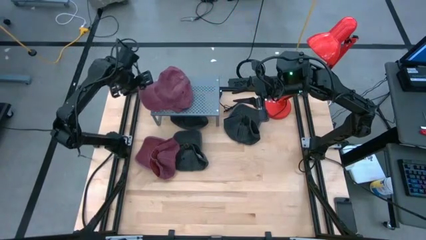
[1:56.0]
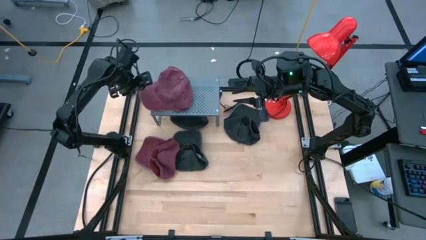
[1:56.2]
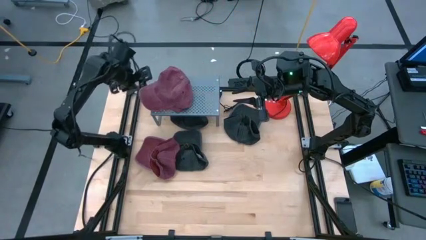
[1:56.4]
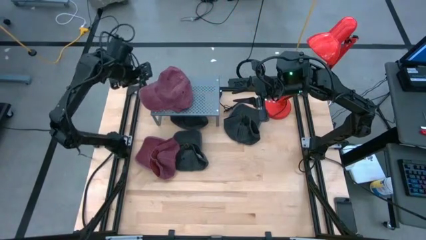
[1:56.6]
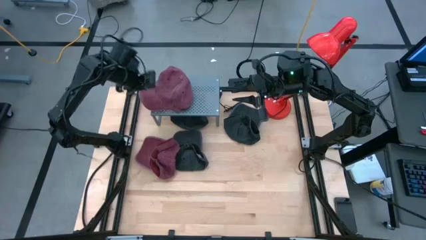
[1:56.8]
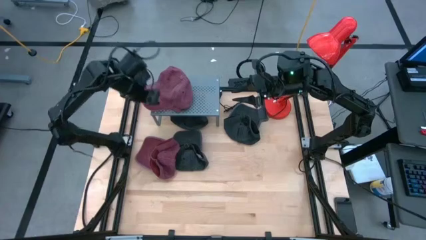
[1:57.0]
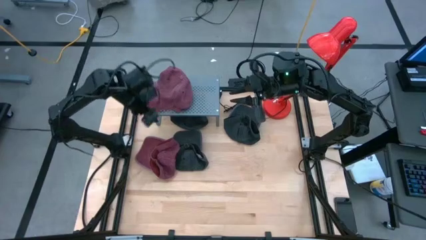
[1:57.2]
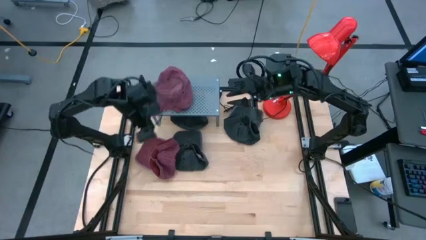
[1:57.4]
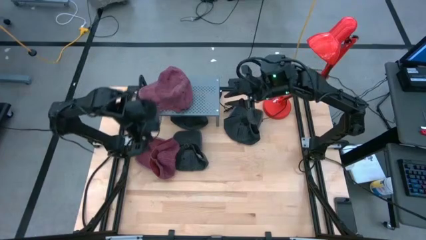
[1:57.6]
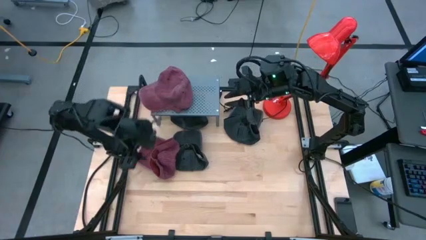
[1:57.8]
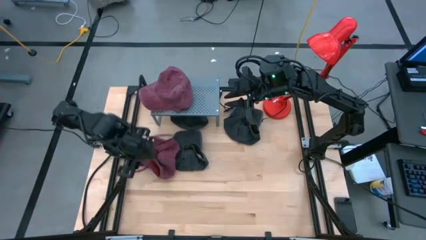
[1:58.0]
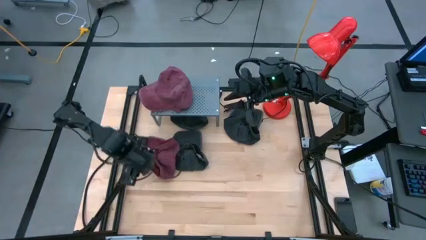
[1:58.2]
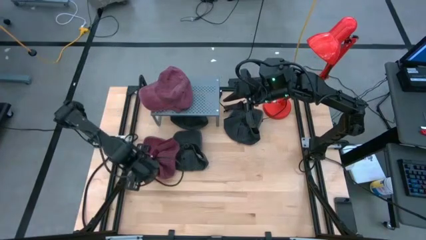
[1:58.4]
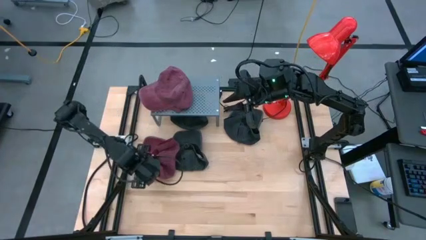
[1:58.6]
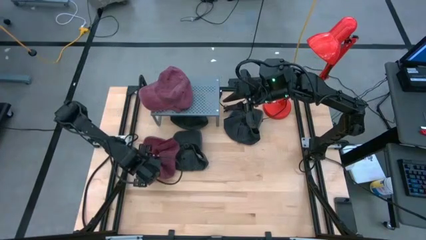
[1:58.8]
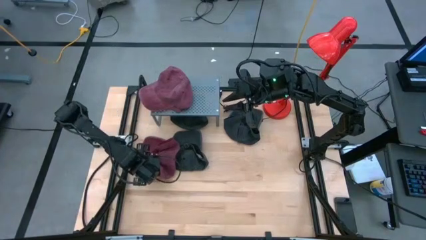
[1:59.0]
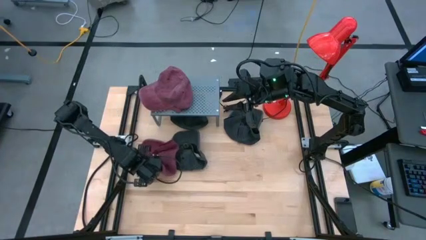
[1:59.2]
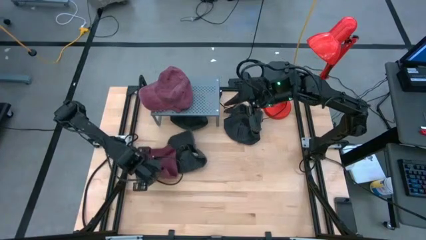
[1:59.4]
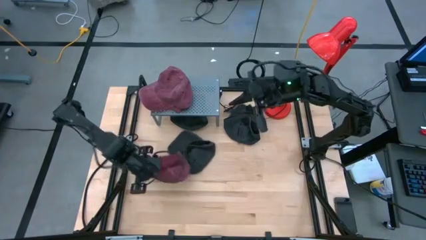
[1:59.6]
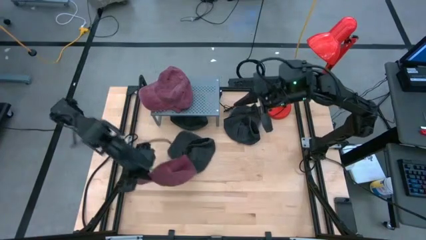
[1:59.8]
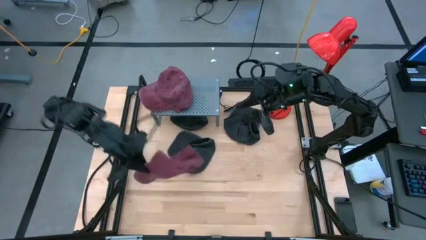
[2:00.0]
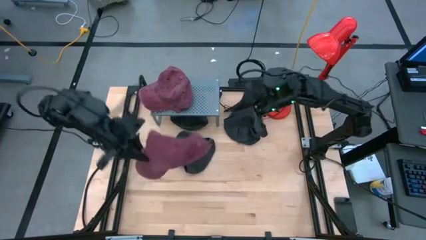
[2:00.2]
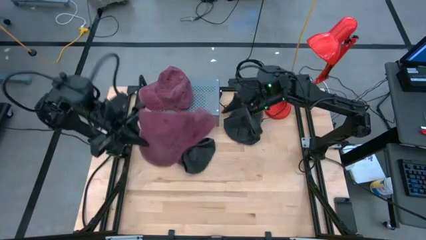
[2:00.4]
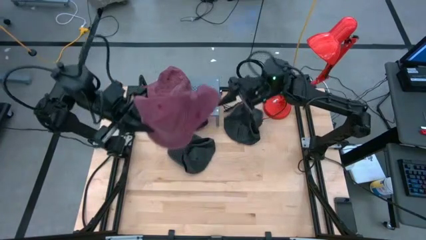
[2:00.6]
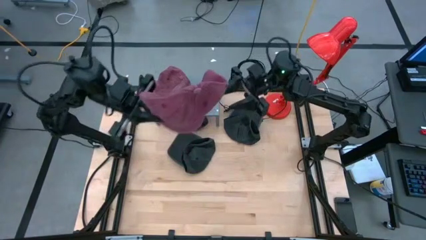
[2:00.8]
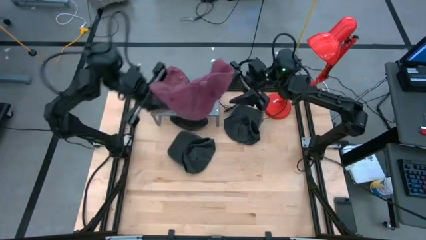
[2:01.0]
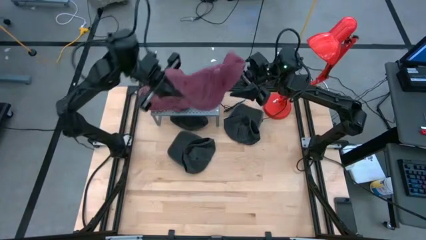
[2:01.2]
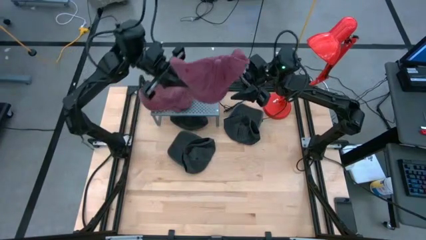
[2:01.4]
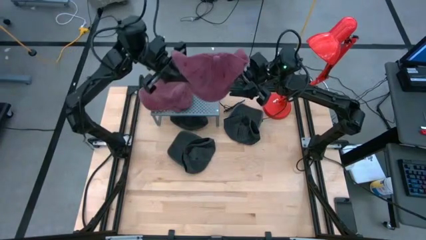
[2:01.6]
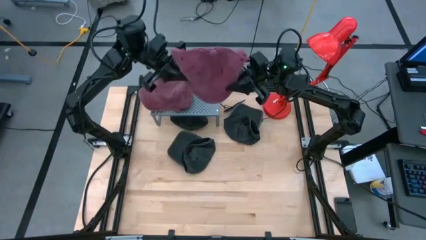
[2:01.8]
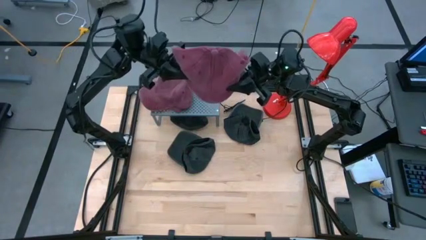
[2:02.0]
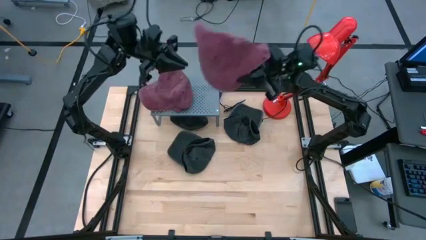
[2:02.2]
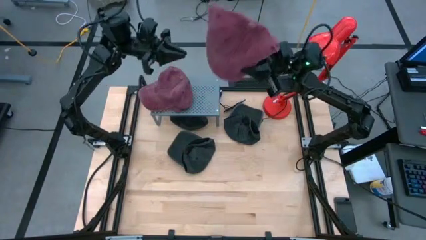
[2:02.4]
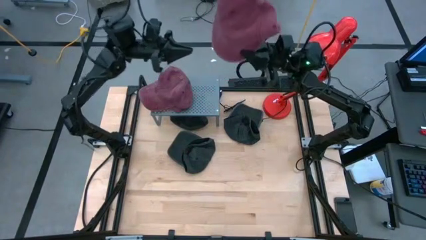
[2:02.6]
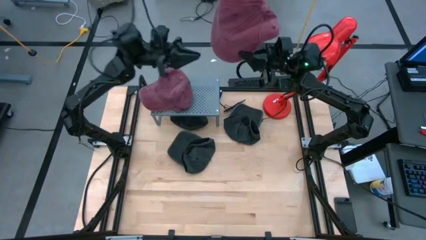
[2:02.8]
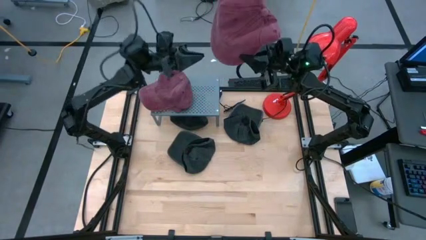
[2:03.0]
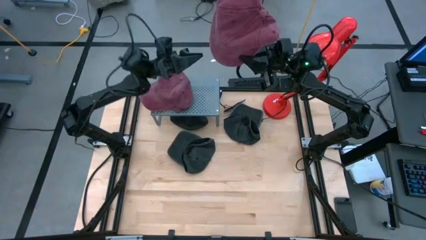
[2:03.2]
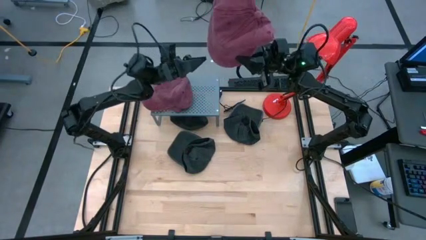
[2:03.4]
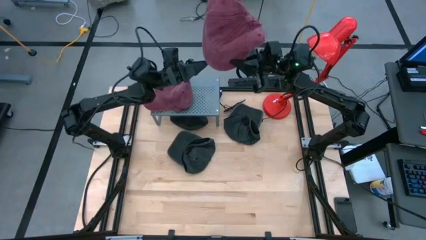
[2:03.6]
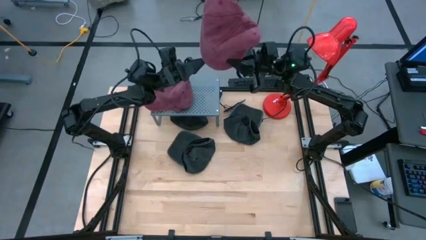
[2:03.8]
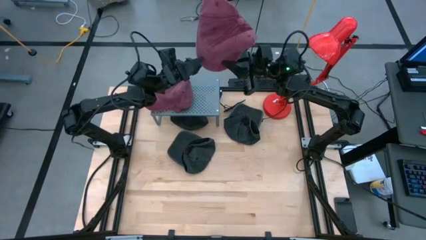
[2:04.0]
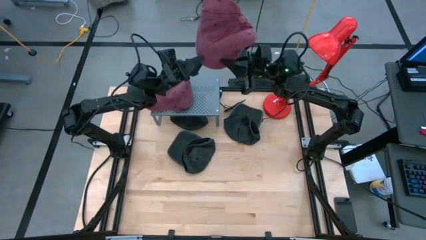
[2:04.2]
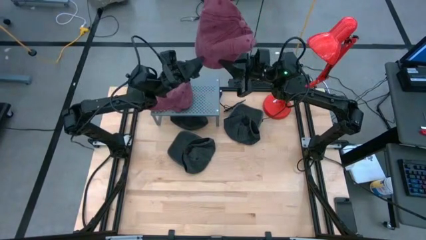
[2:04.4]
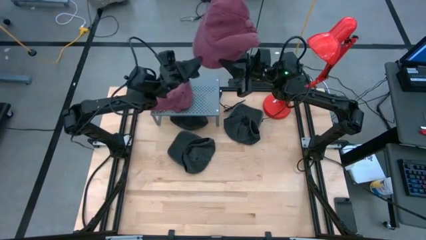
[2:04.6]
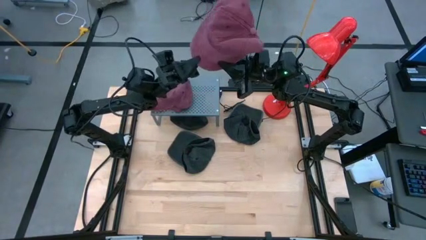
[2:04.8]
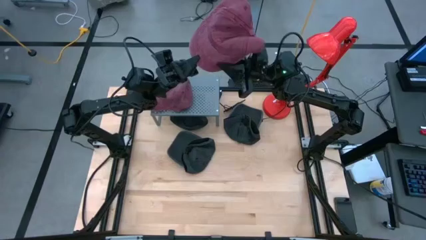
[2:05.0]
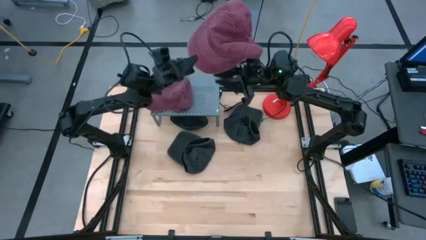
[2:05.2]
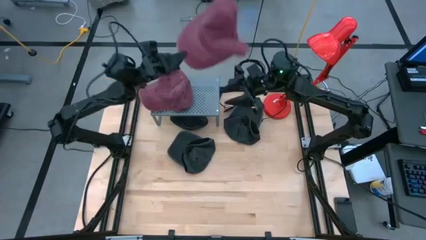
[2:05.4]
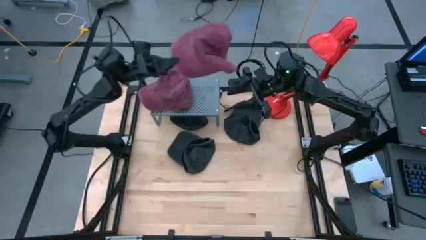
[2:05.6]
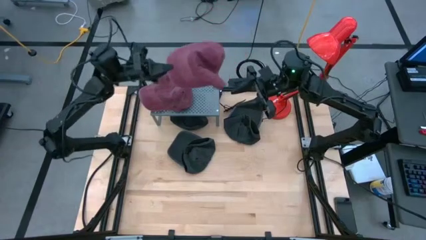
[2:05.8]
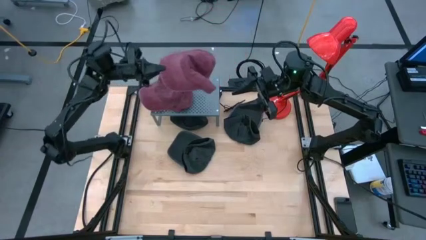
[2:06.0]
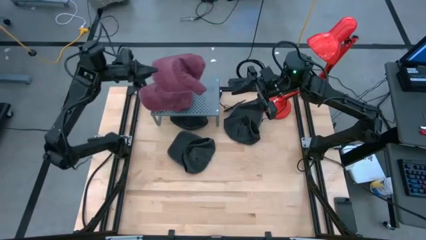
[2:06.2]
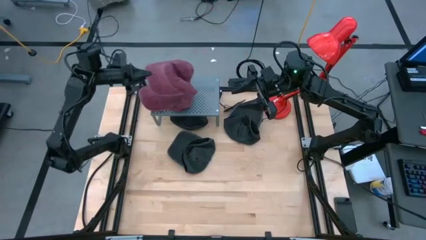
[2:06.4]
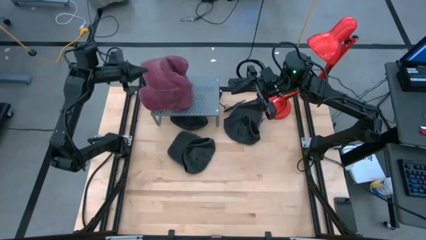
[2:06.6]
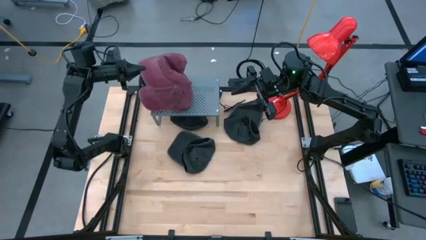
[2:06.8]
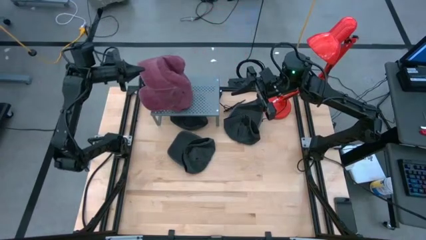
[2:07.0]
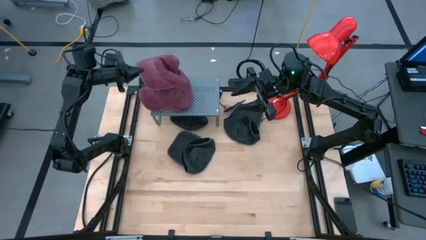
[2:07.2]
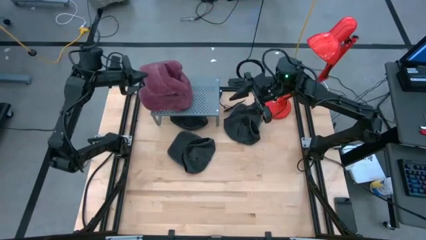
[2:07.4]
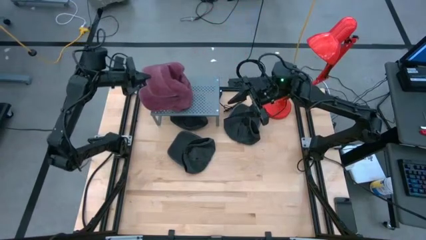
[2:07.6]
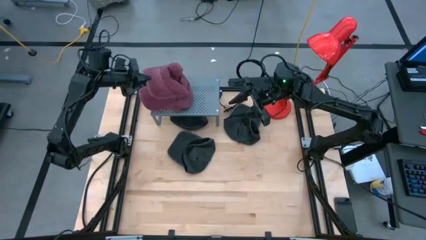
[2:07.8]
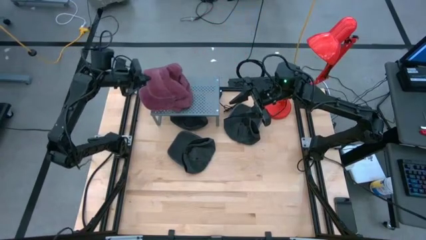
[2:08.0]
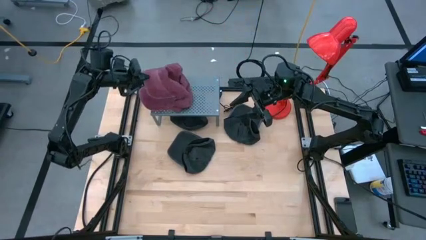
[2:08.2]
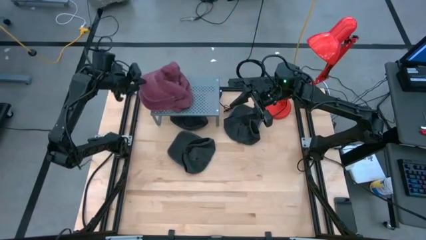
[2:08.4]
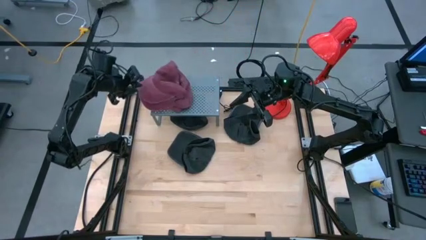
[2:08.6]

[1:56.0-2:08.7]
Task: Pick & Place hat
Stack the red cap on top of the red cap on the shelf

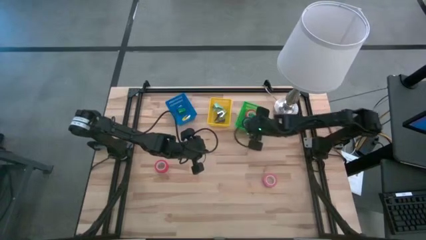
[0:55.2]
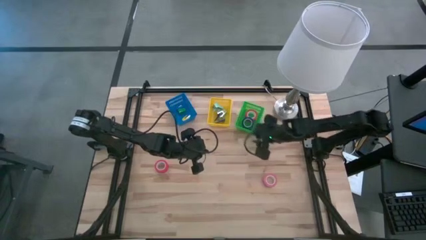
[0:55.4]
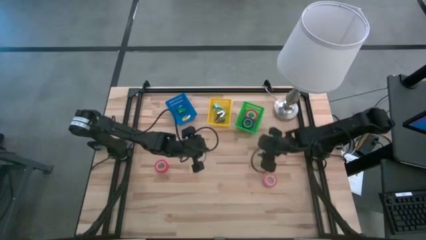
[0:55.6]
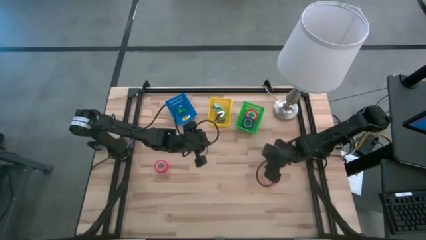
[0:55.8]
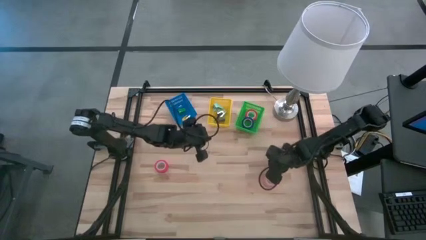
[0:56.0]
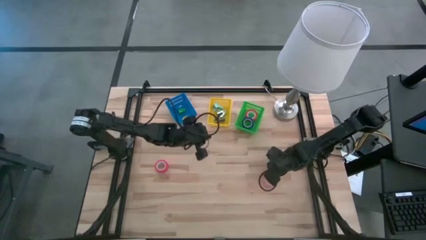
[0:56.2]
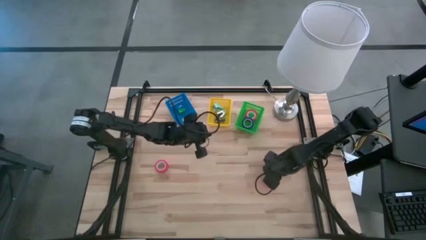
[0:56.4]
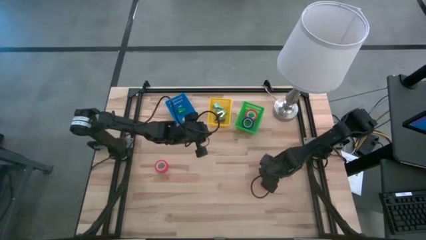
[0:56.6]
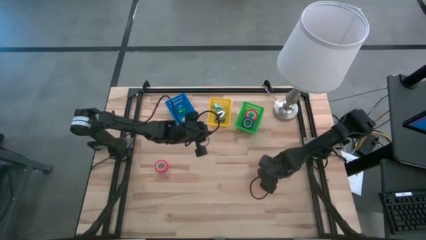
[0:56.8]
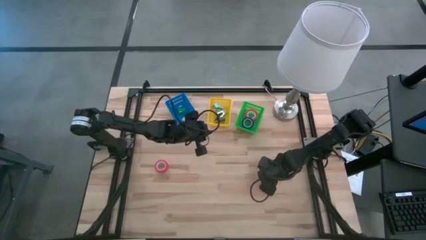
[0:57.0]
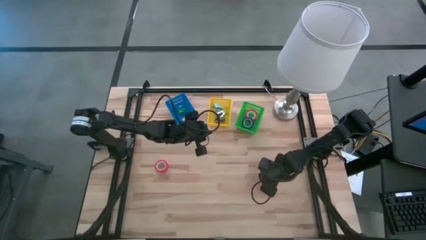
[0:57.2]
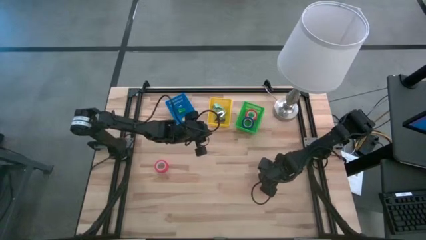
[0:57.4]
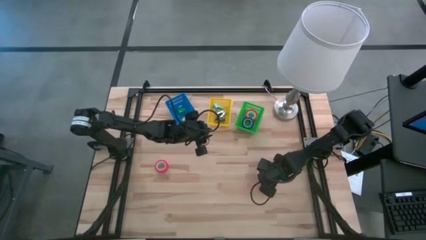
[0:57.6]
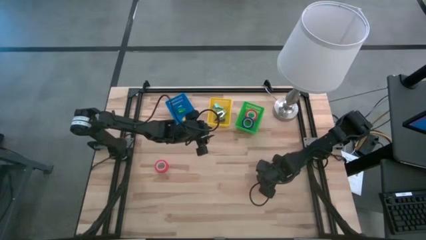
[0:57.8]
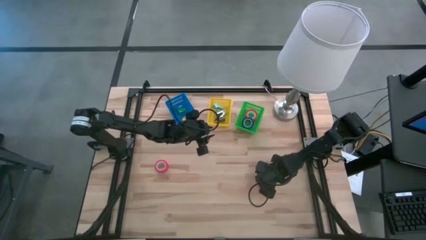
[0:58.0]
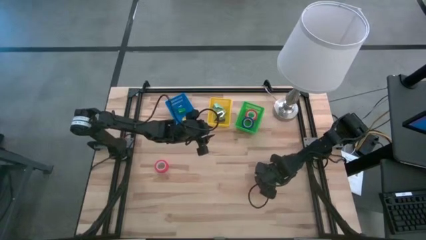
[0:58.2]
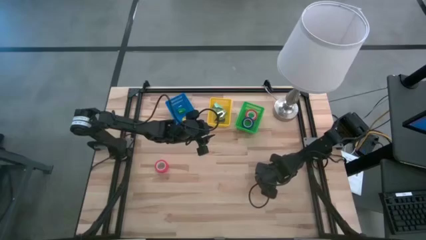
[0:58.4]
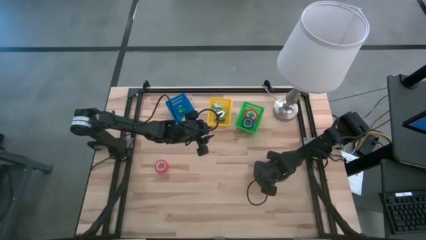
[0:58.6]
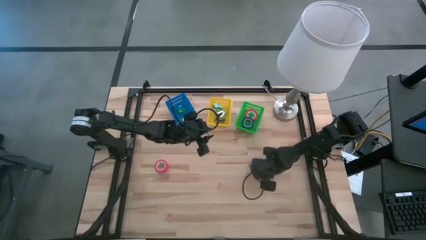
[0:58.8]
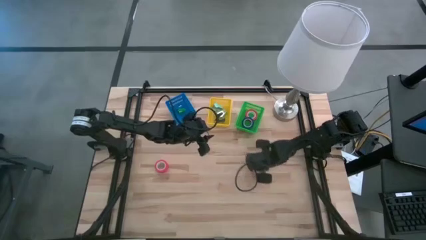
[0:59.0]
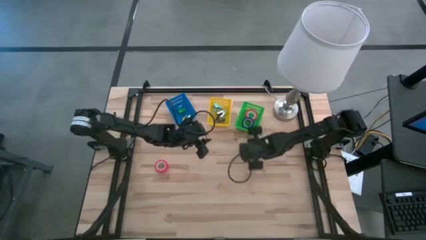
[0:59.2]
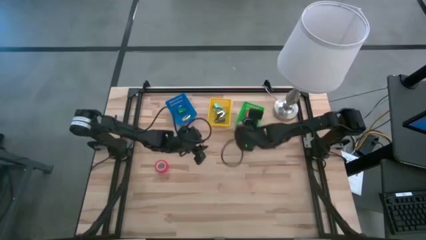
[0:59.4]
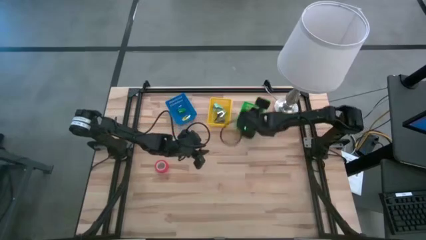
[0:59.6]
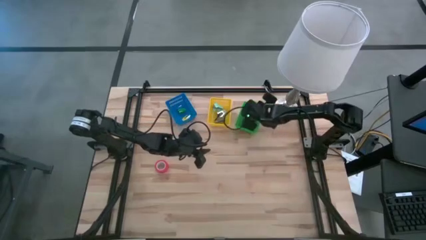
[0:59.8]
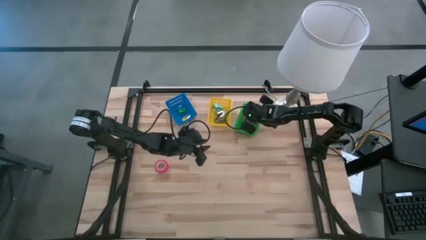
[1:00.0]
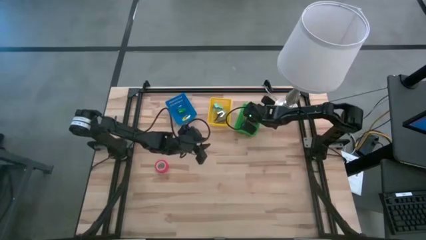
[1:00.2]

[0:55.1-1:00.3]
Task: Pick and place Stapler, Stapler remover, tape
Put the pink tape into the green bin
